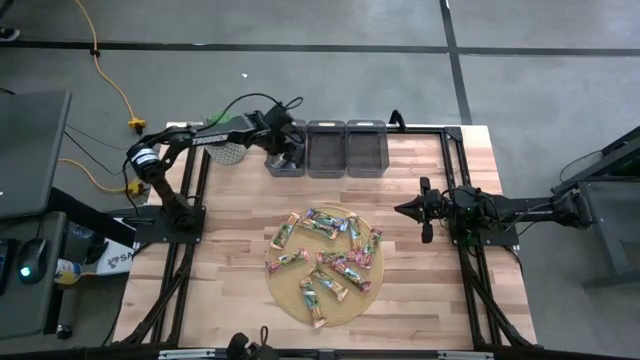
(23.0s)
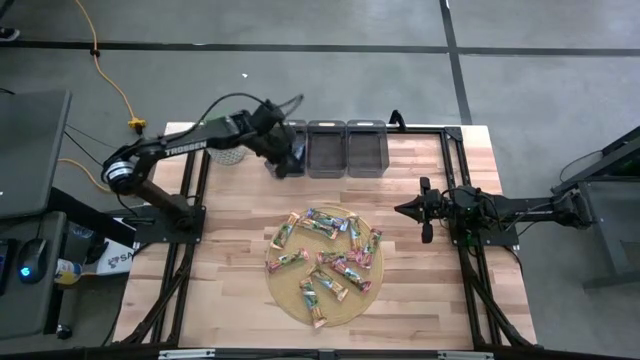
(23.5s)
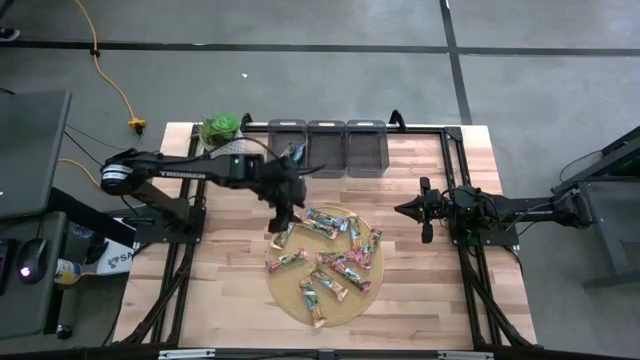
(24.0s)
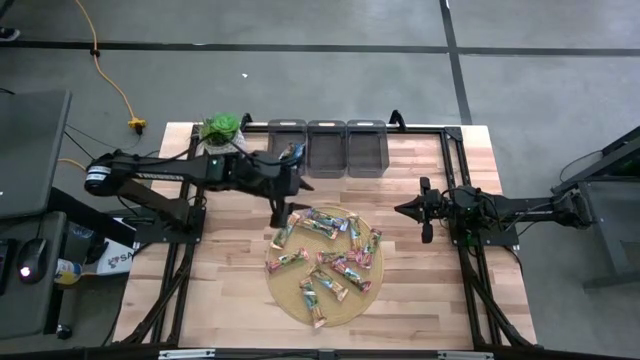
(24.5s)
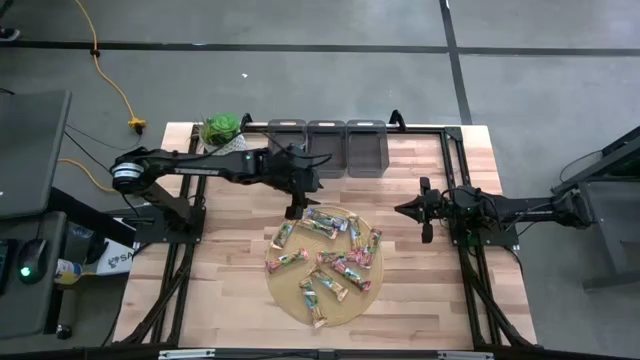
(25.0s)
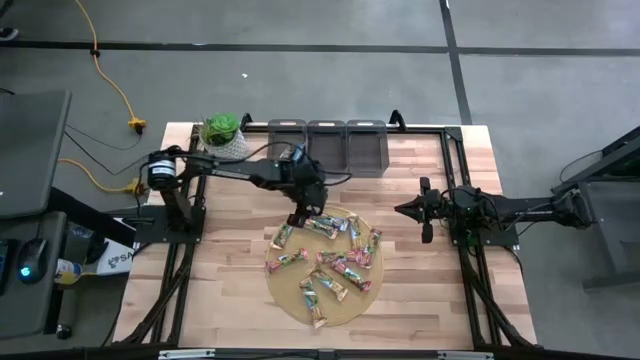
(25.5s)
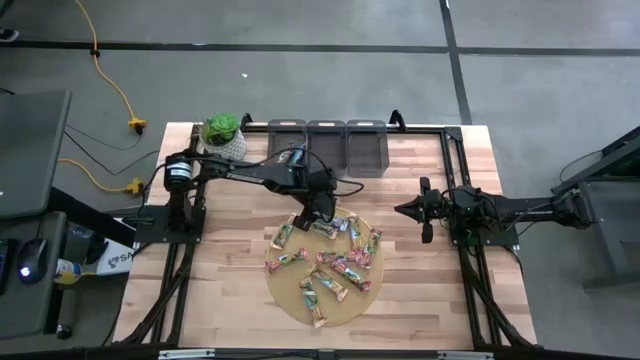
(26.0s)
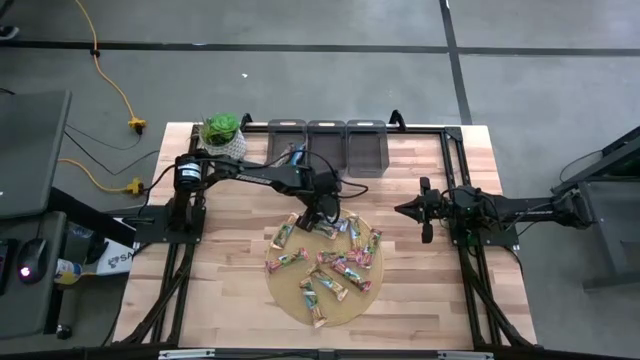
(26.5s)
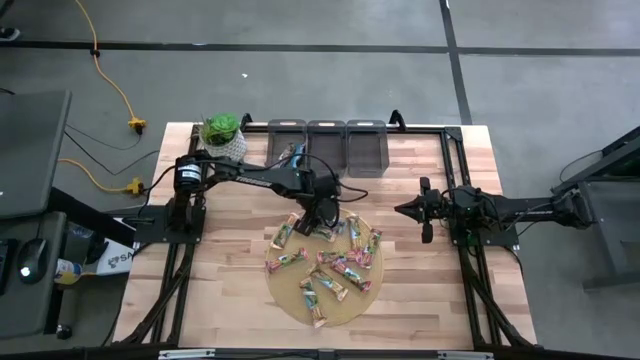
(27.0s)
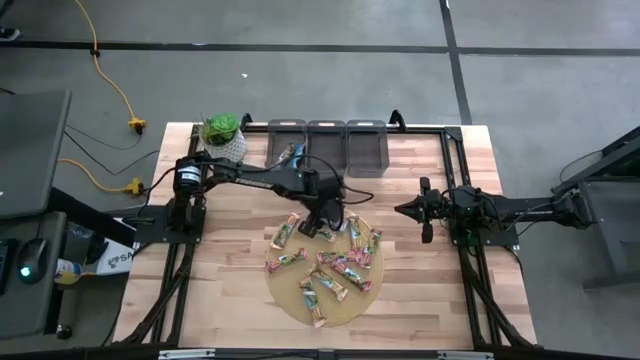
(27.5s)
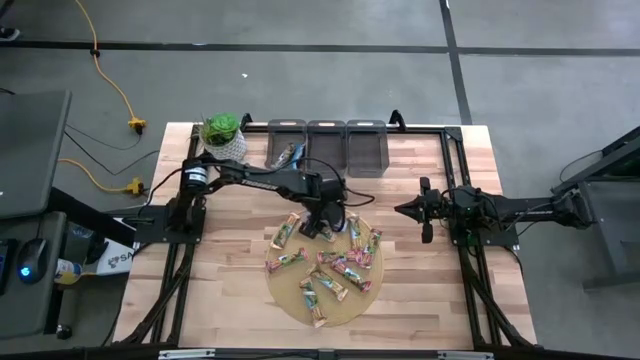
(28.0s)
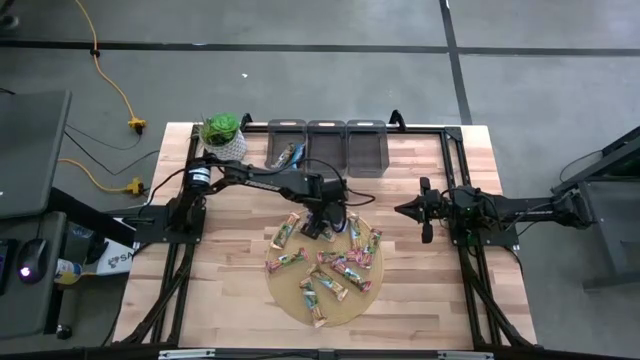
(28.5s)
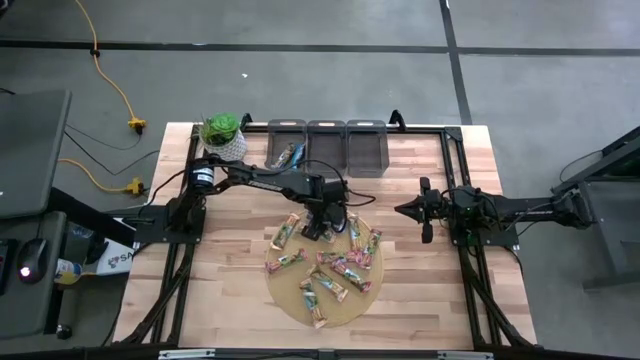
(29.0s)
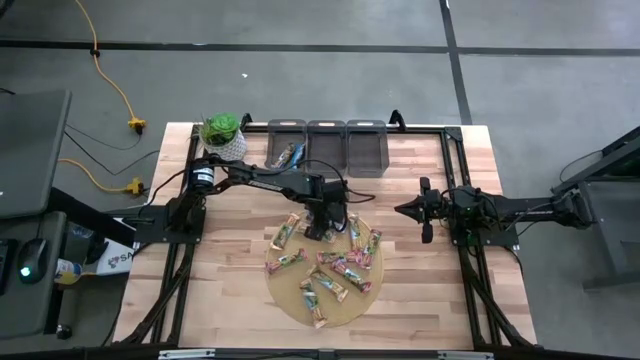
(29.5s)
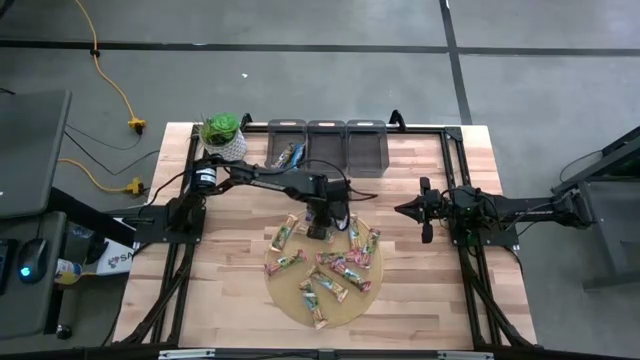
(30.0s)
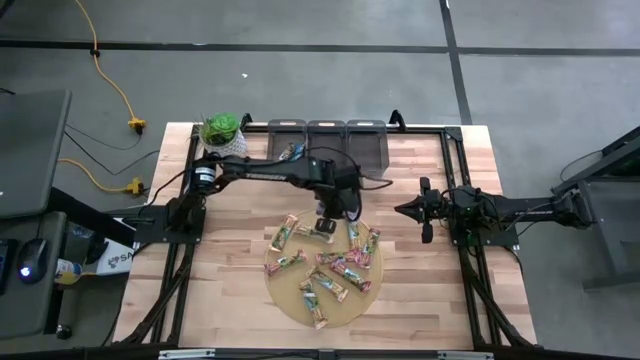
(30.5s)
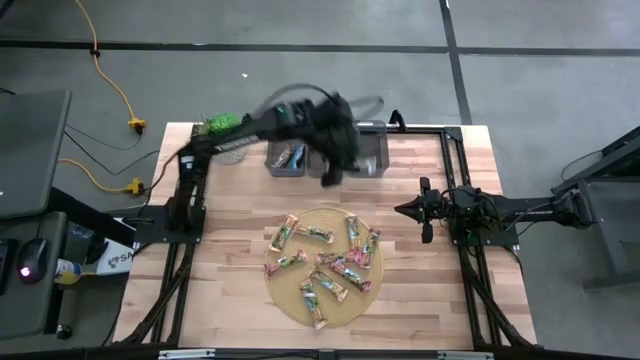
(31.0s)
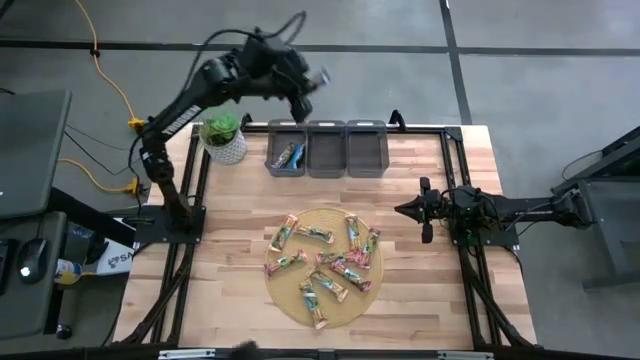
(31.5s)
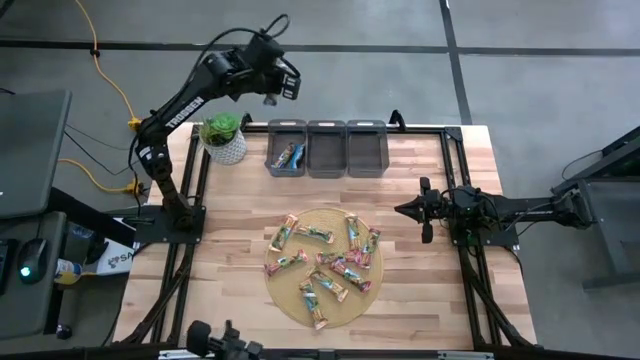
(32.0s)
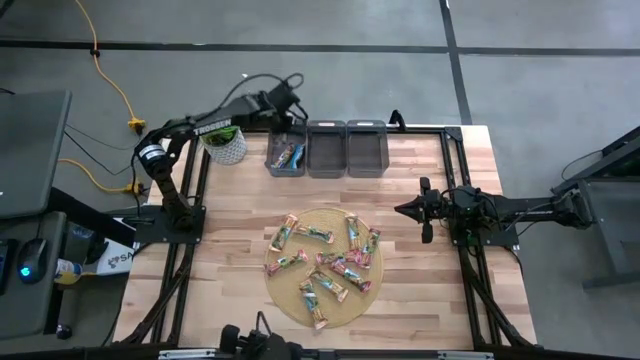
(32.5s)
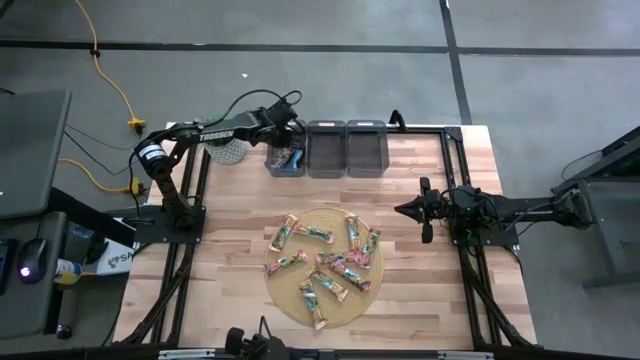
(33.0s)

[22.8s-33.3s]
Task: Pick and place Granola Bars by type
Put the blue granola bar into the left black bin

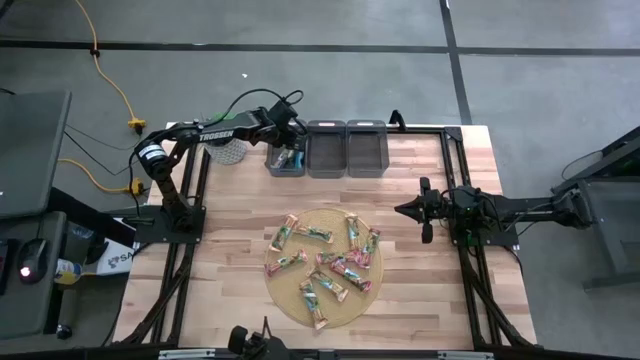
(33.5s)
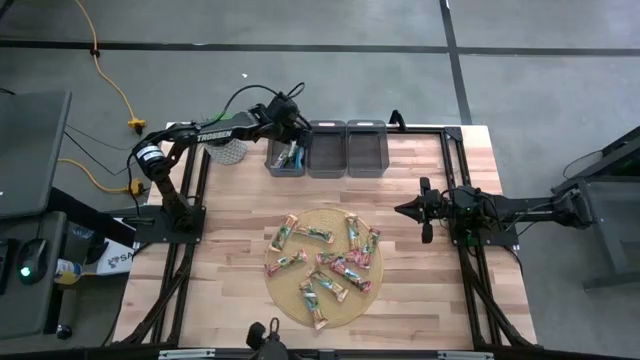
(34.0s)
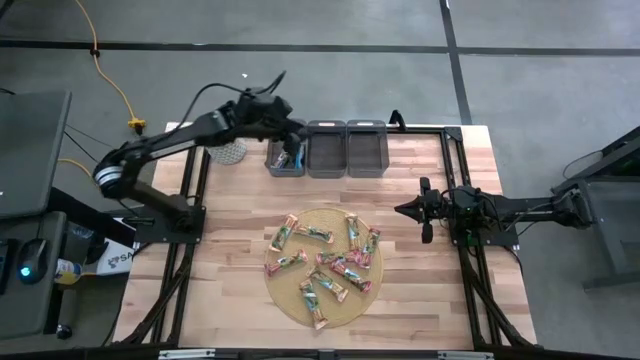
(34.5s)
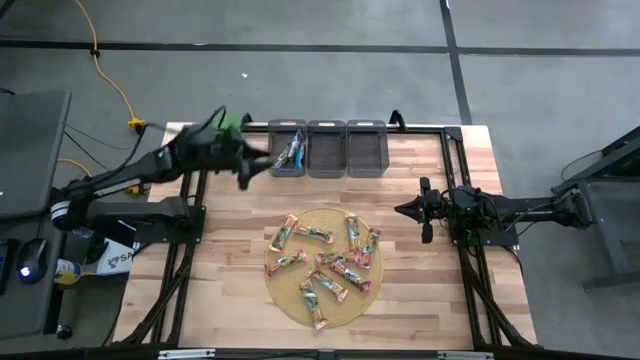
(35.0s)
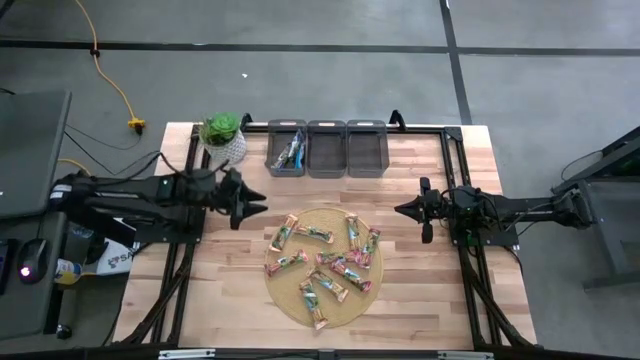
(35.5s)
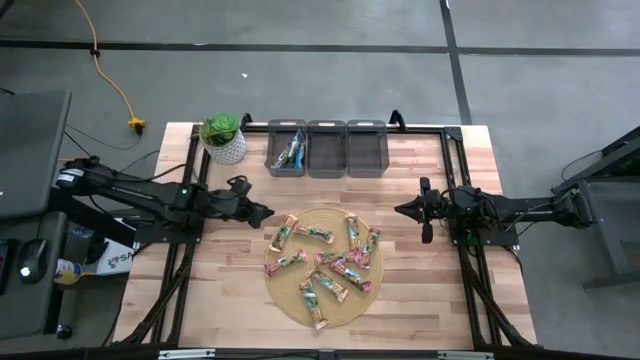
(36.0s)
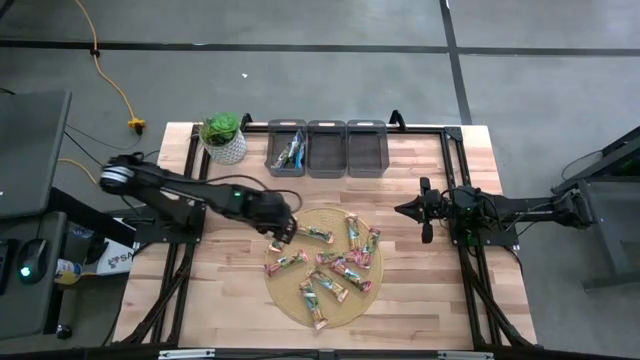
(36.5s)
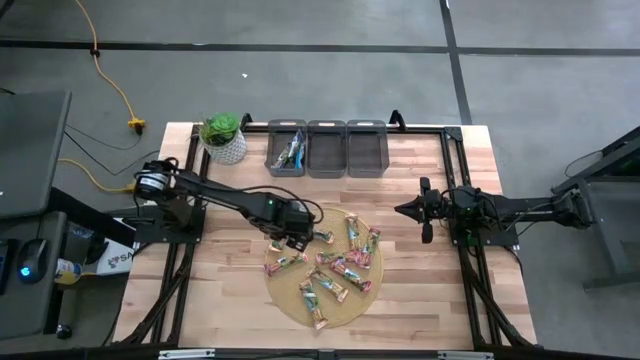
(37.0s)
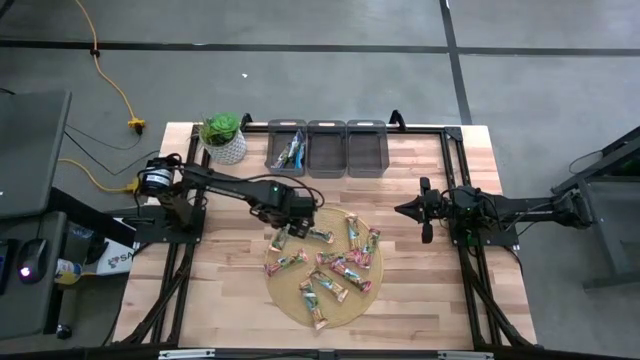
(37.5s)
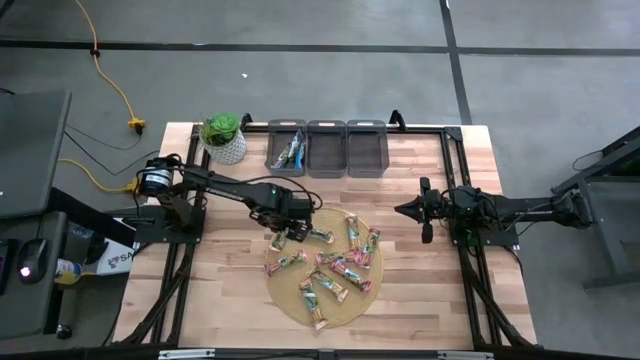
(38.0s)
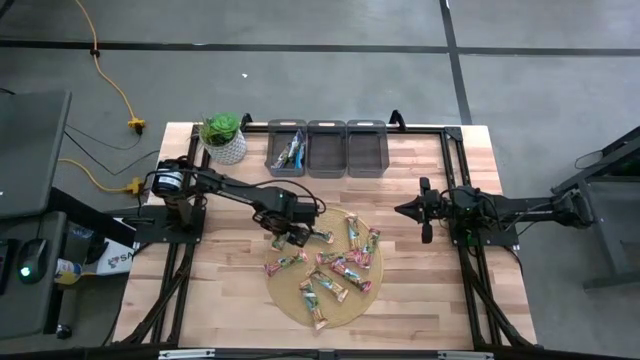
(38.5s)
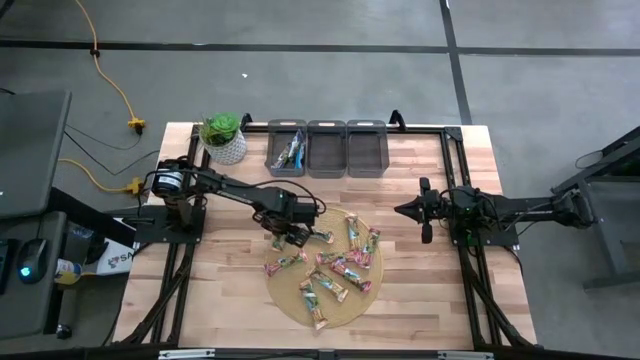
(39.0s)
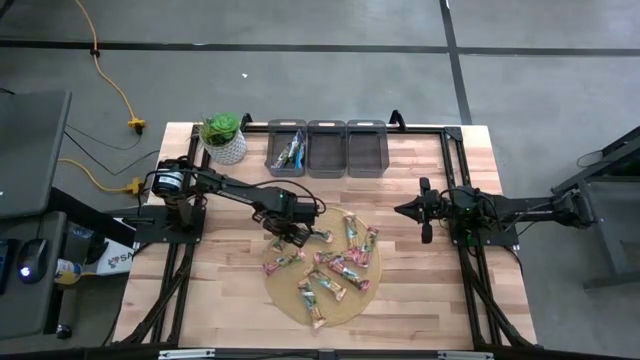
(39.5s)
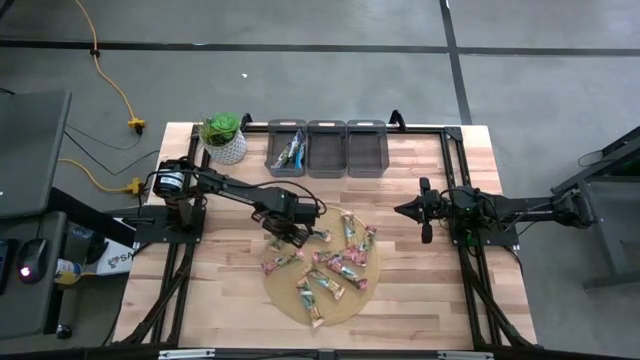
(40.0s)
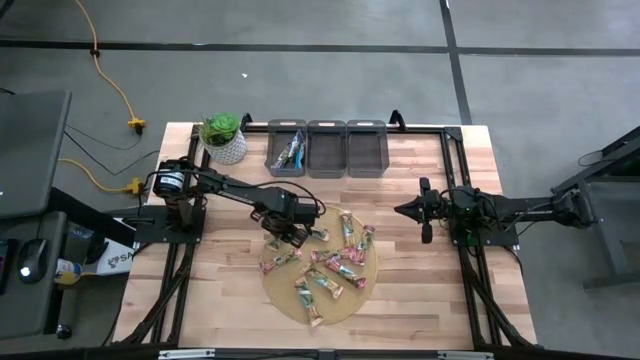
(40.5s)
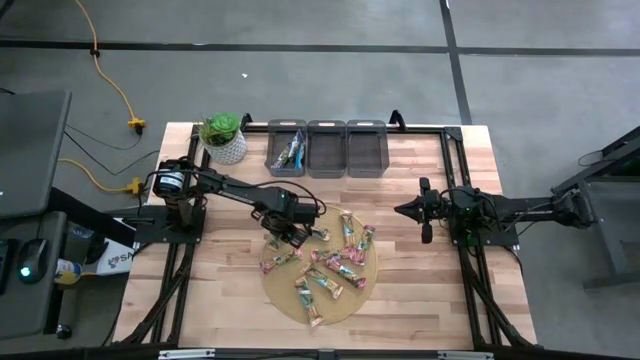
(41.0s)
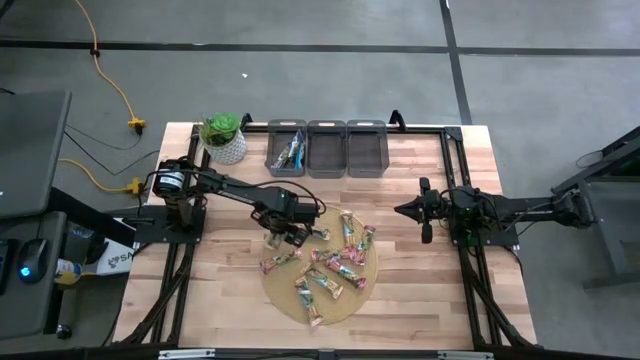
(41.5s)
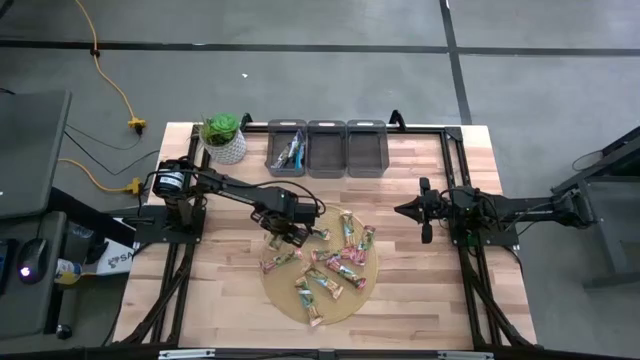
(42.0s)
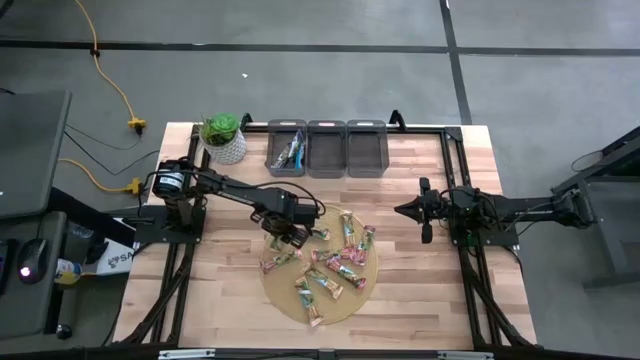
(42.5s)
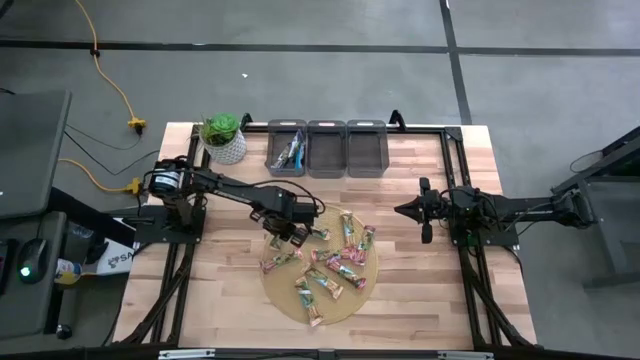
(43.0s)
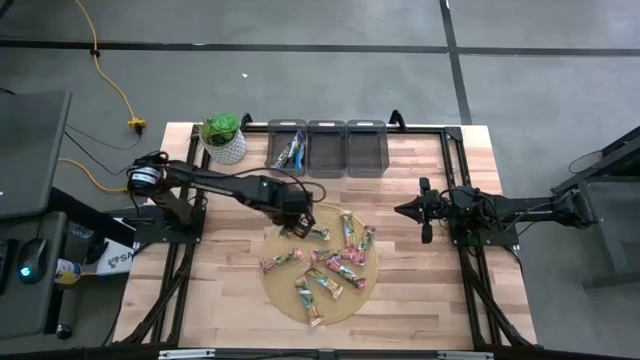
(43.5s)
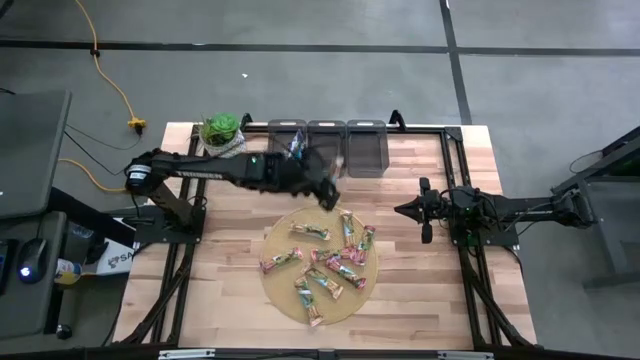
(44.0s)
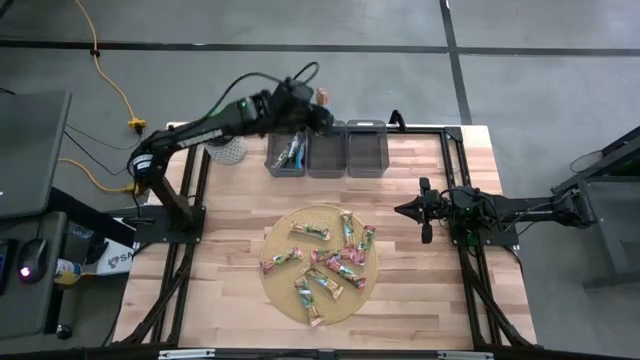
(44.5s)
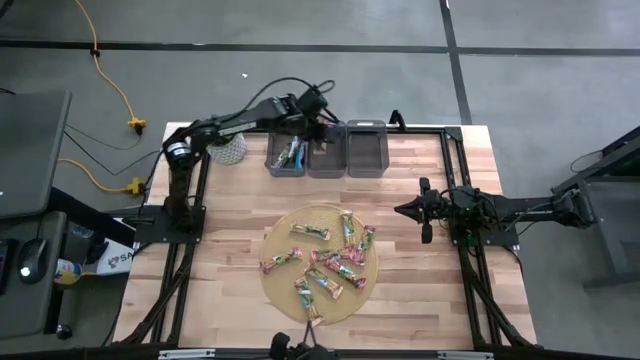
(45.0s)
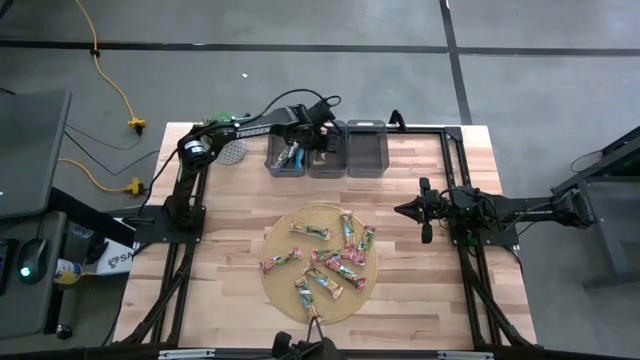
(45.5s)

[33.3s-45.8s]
Put the yellow granola bar into the middle black bin
